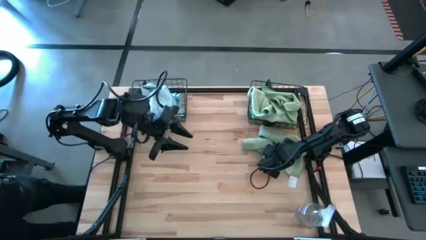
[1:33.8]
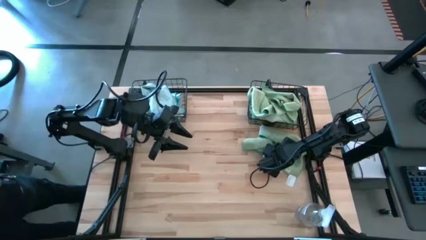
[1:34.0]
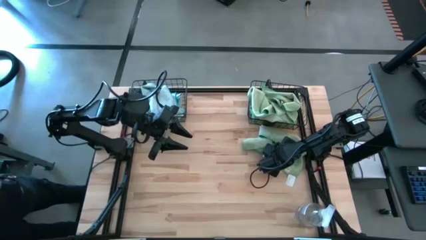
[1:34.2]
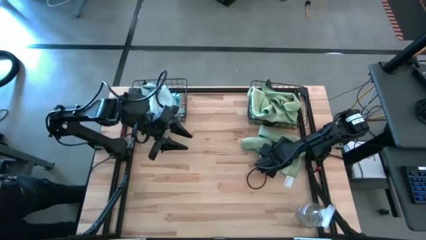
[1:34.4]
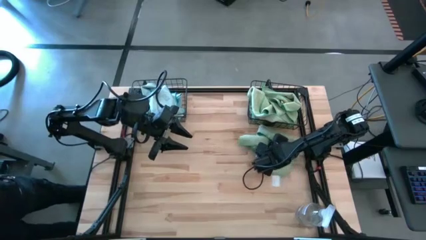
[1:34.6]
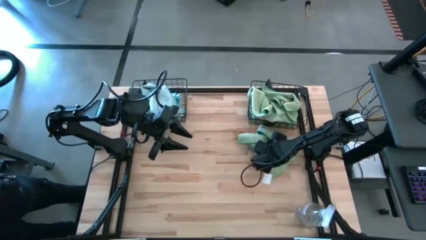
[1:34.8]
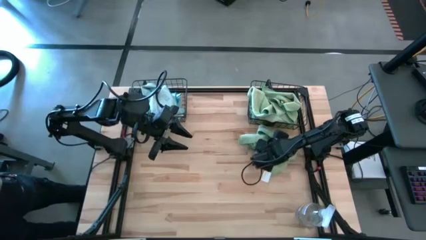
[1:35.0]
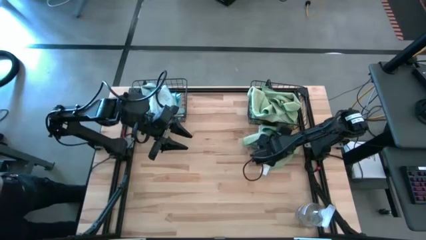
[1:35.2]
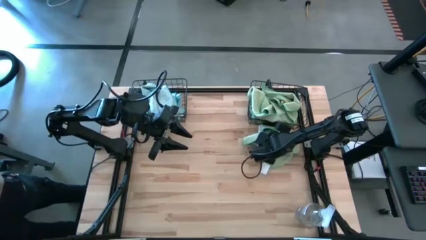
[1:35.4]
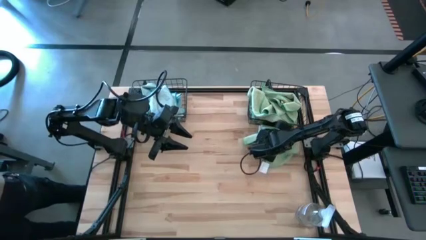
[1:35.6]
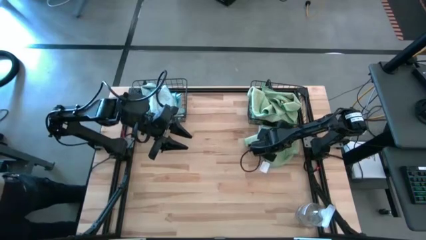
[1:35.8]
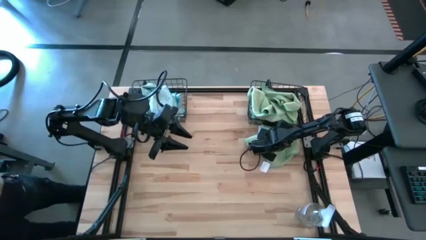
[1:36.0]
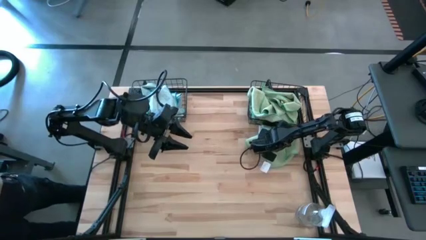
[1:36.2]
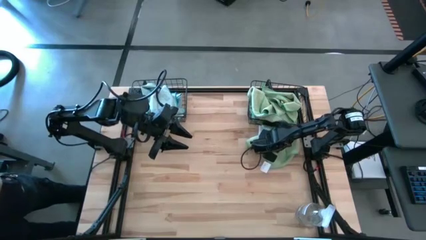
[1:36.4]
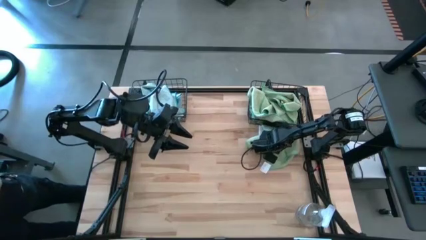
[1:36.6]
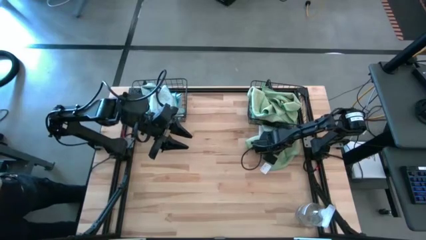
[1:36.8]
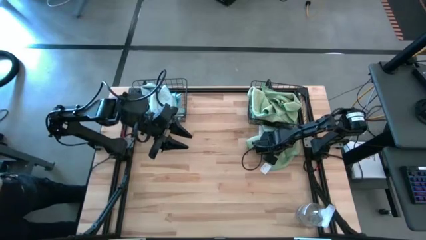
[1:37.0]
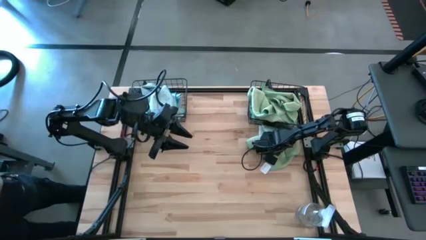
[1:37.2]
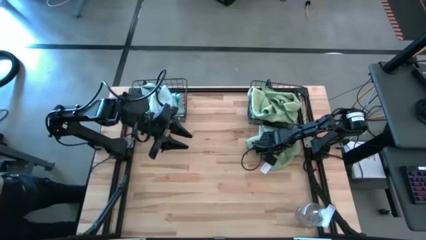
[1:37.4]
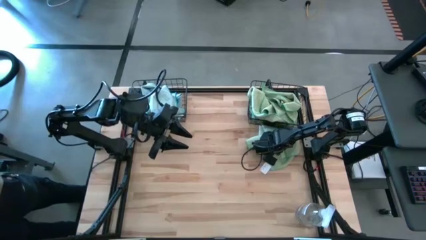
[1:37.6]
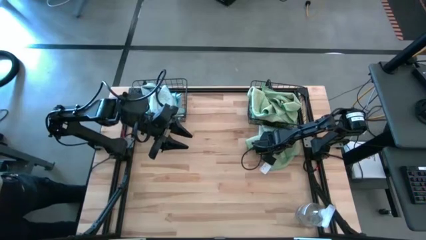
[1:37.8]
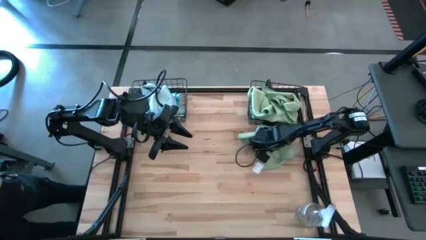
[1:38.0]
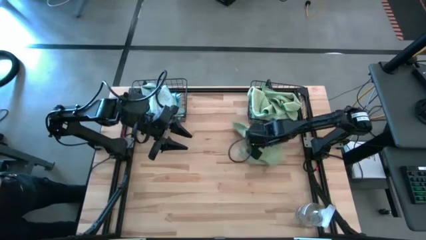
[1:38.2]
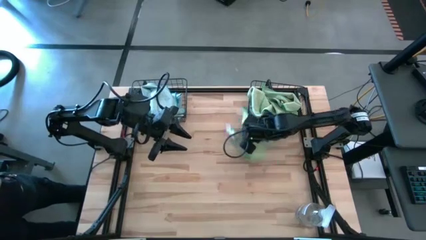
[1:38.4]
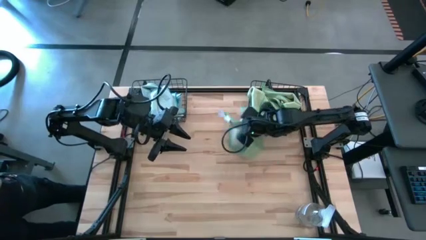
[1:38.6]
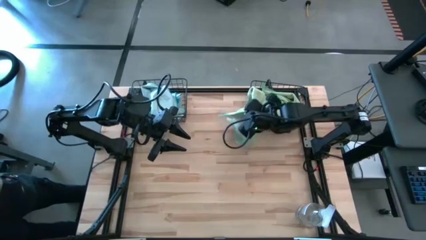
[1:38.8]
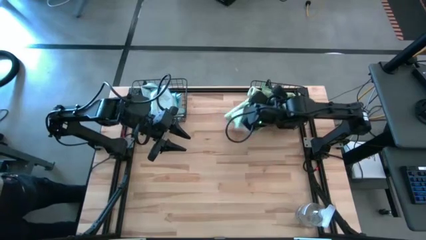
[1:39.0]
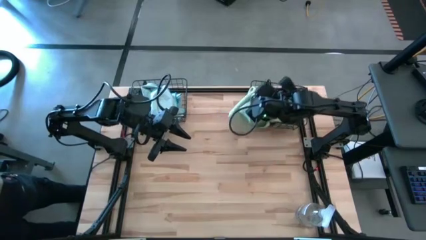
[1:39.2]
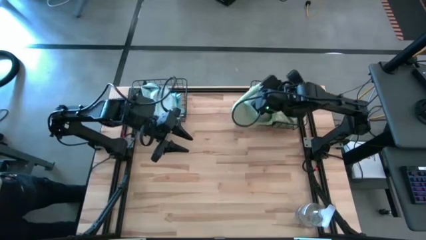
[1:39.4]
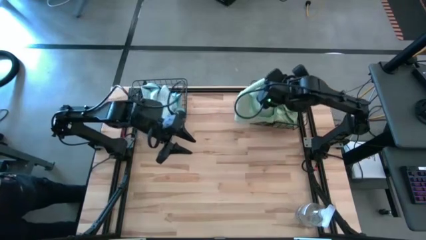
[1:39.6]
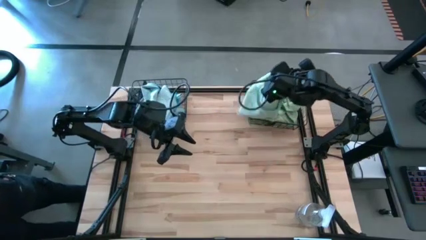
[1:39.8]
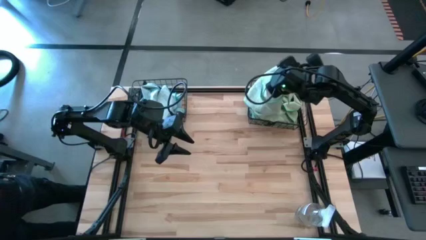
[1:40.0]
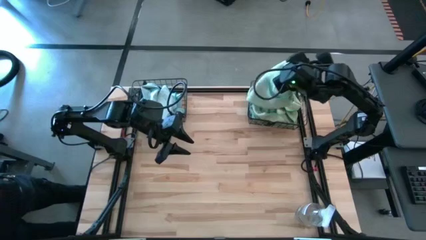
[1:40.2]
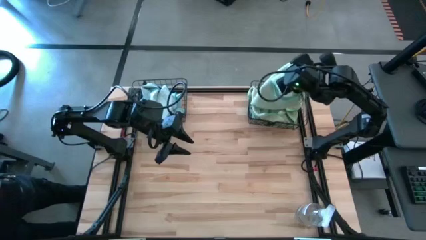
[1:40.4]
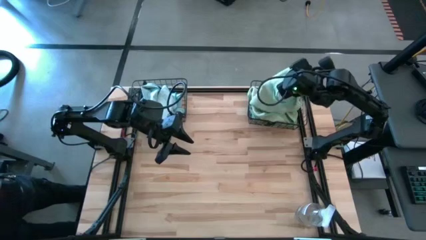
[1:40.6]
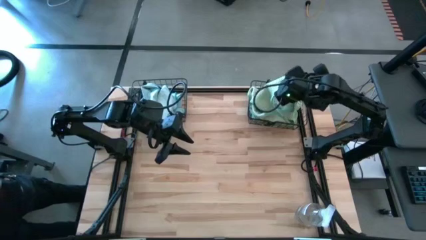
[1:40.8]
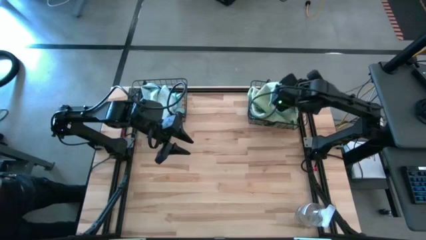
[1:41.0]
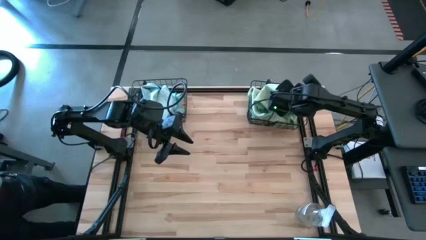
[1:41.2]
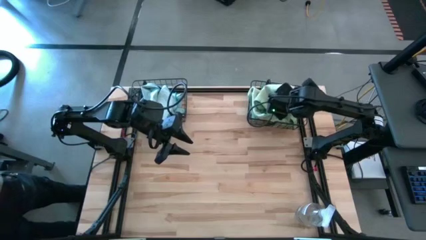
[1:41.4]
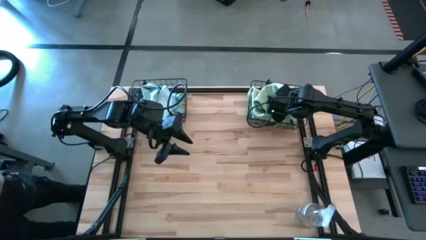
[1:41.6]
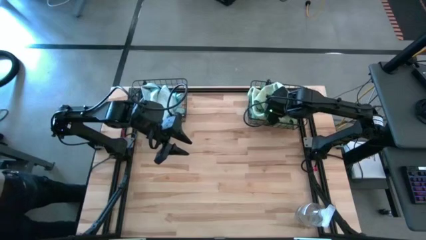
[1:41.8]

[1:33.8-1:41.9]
Task: Sort microfiber towel by color & place in baskets
Put the green microfiber towel into the right wire basket

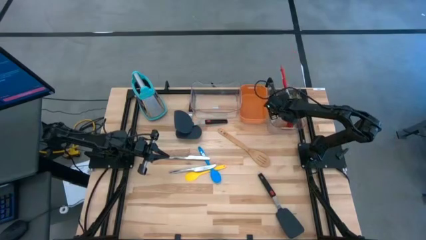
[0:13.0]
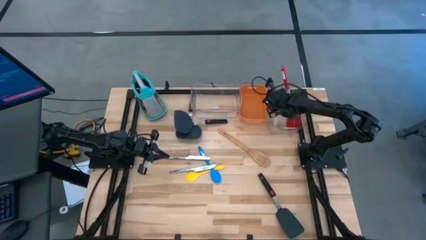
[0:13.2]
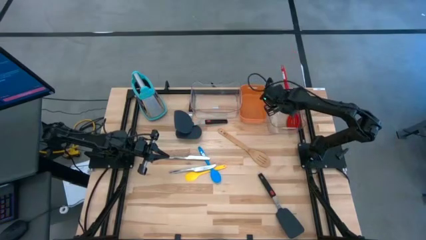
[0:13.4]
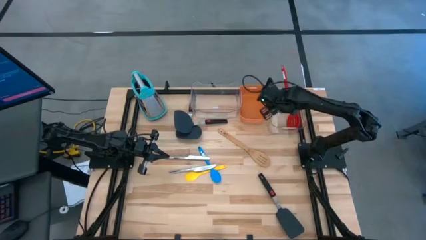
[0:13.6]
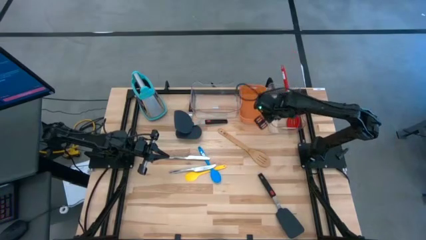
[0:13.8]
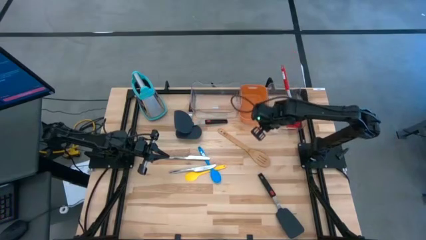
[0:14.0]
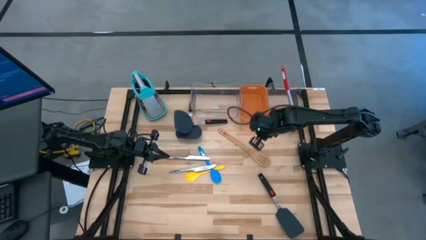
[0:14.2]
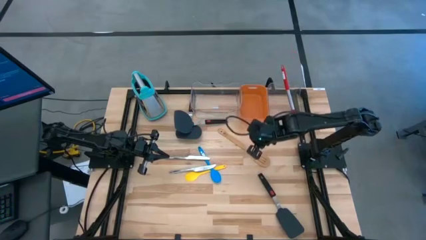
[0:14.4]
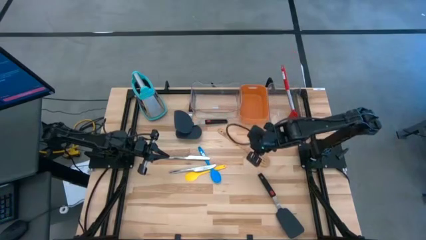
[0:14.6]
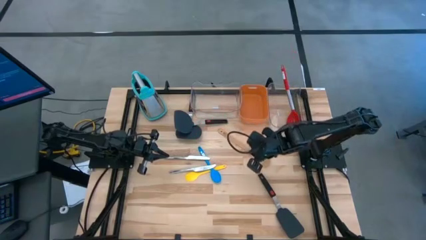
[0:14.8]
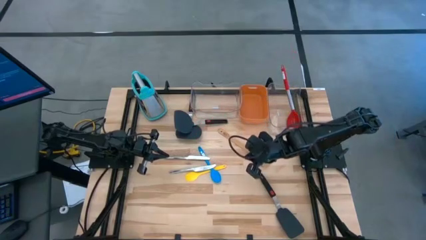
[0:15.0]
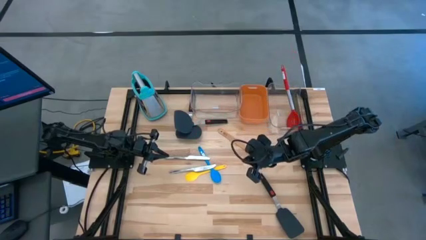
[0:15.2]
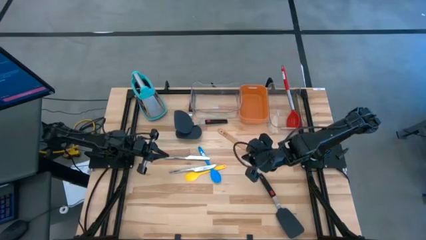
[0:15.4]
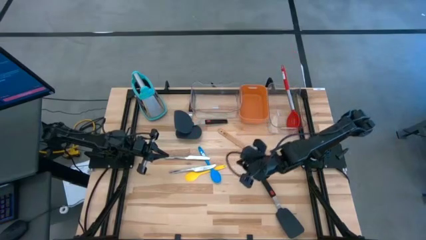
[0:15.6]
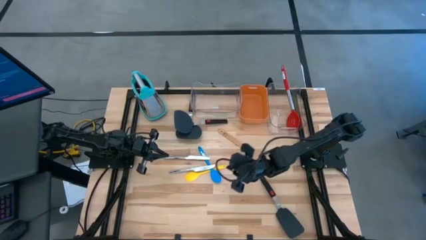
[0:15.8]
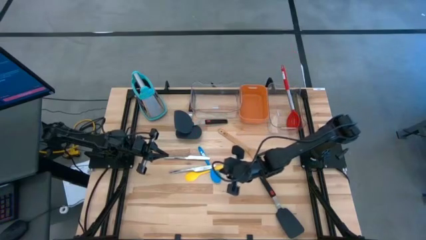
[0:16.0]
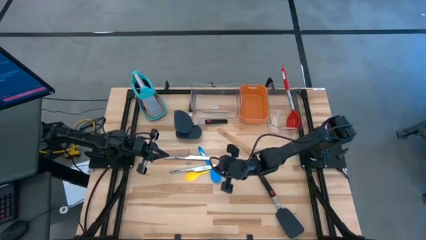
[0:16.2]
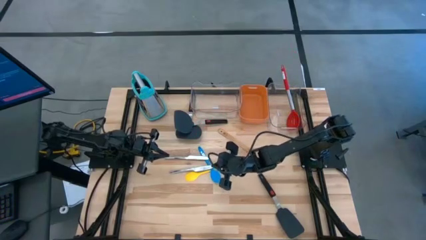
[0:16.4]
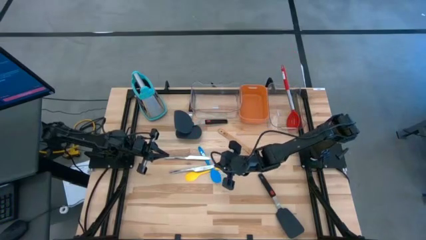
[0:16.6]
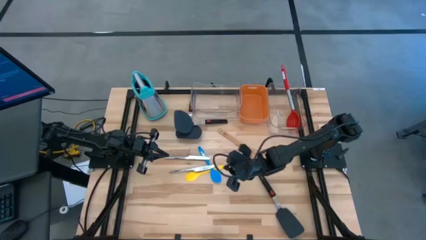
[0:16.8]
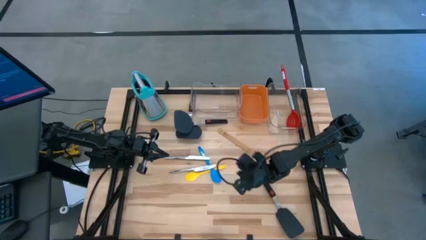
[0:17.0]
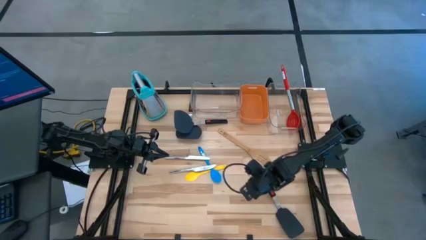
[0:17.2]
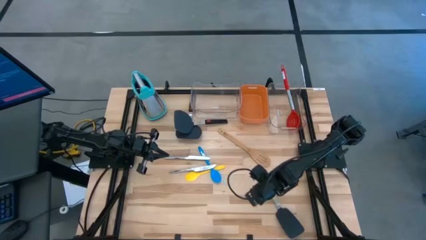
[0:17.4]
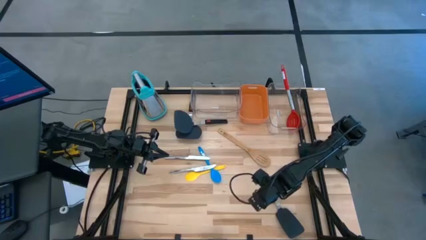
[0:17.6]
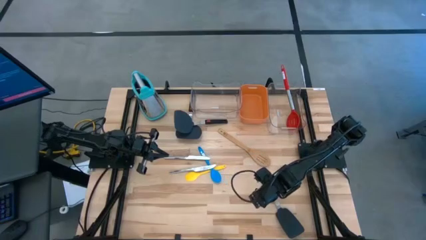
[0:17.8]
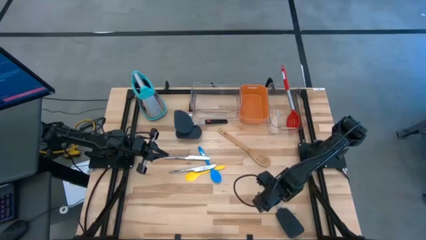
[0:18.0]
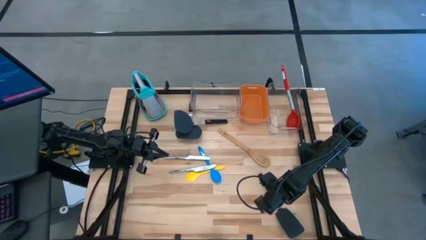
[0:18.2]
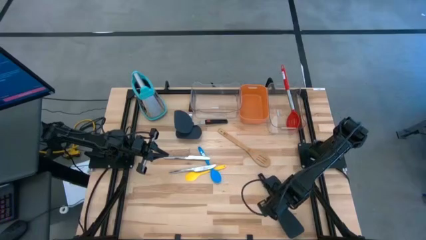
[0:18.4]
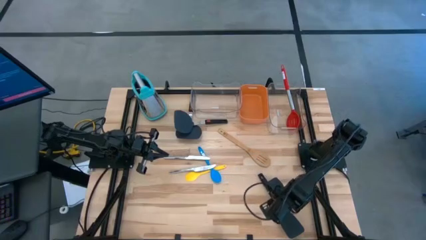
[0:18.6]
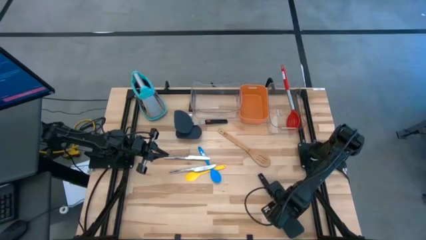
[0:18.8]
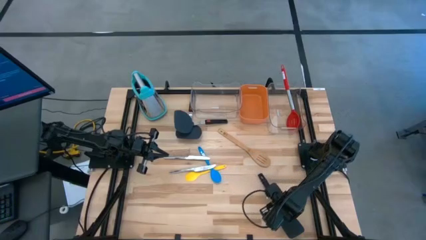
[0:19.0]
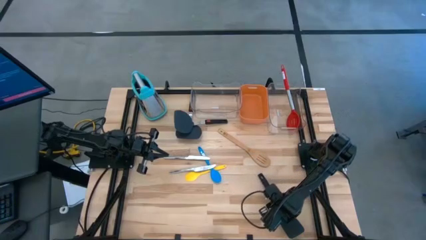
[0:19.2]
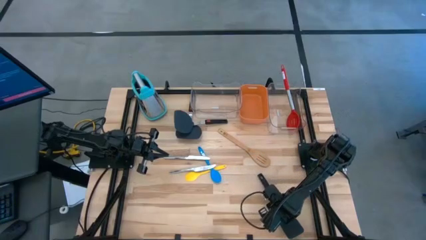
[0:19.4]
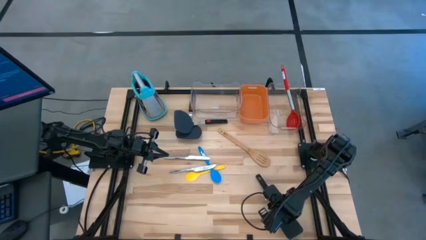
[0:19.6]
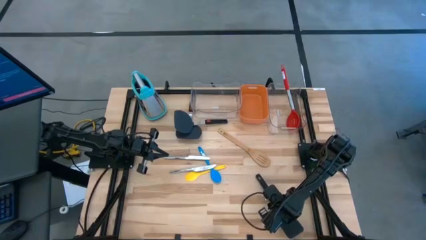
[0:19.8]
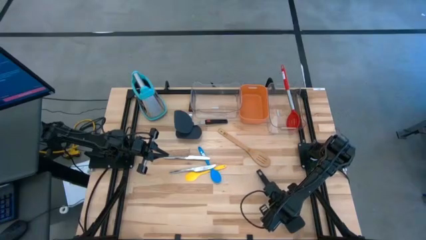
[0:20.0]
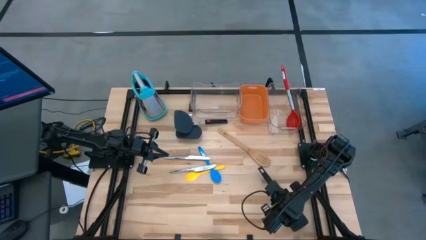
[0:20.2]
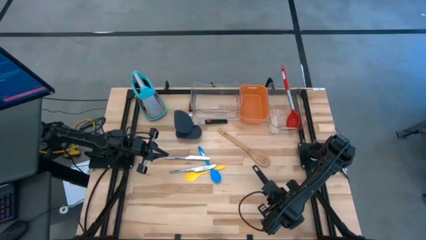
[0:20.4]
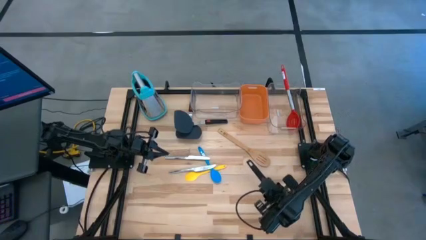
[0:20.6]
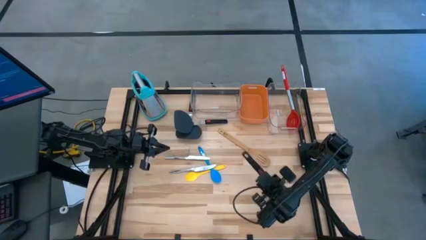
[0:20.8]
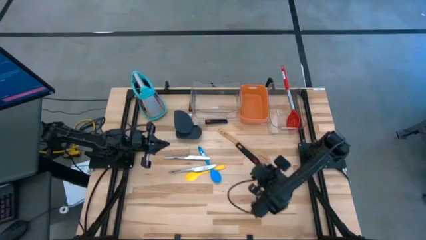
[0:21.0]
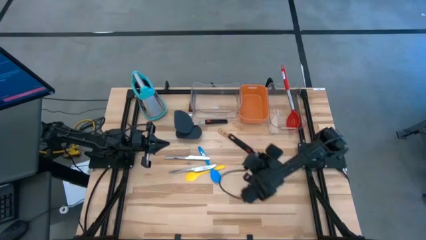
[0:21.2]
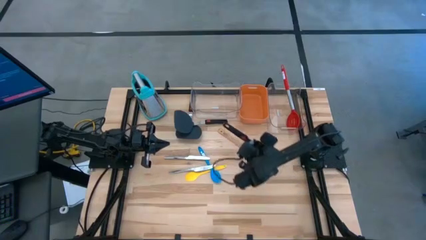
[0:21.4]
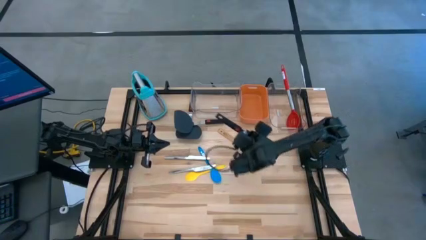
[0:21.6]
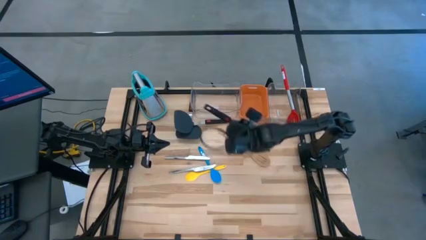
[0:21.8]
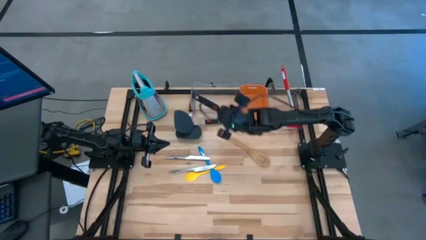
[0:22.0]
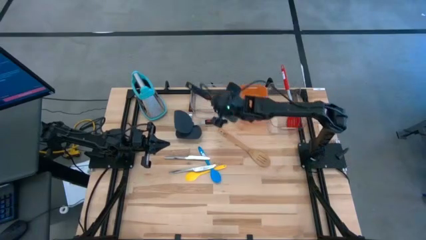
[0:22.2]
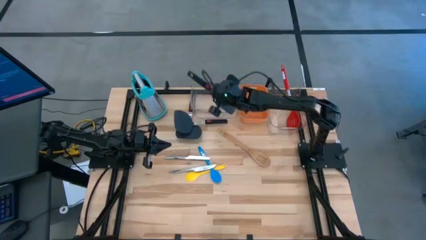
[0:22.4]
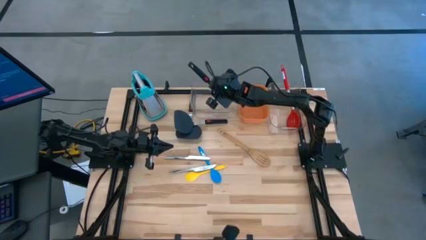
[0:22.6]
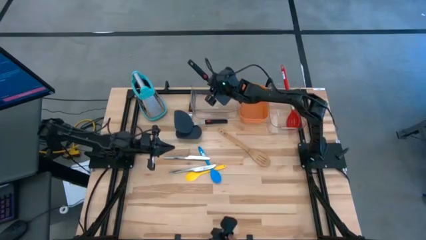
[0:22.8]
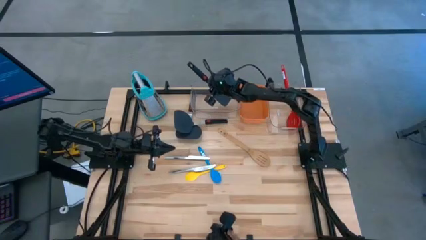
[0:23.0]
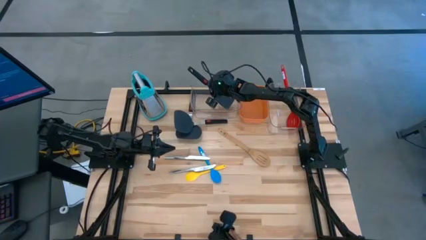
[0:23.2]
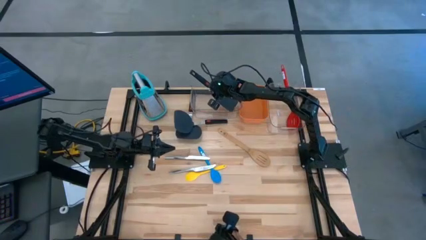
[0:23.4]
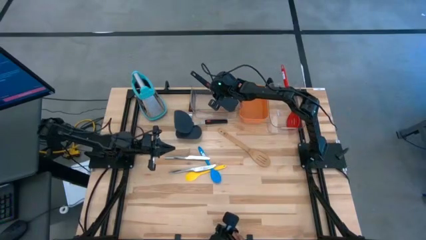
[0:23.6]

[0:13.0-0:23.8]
Task: Pick & Place Kitchen Items
Put the flat spatula in the left transparent bin
